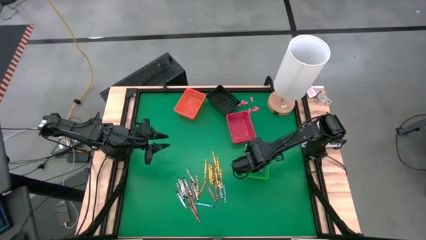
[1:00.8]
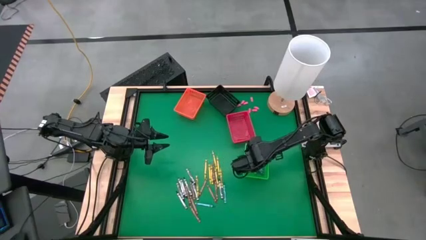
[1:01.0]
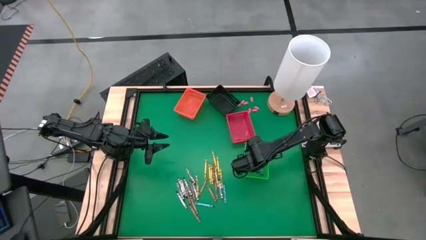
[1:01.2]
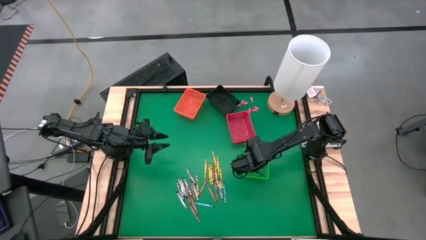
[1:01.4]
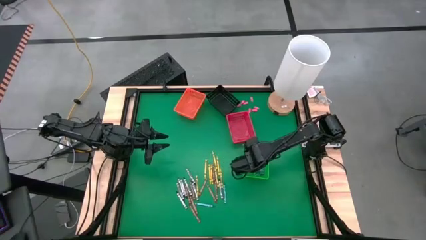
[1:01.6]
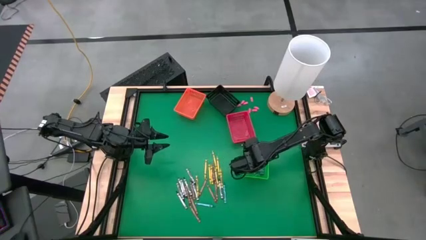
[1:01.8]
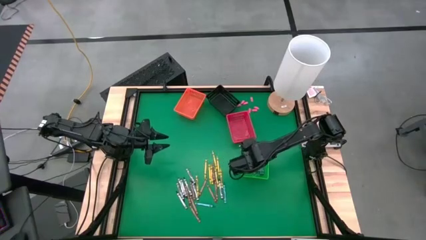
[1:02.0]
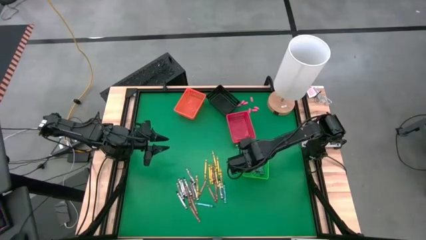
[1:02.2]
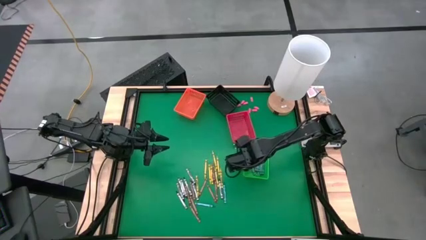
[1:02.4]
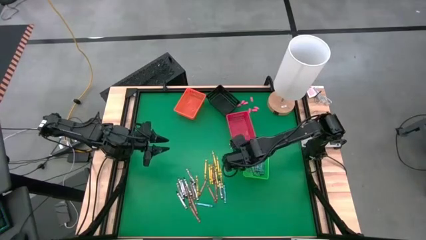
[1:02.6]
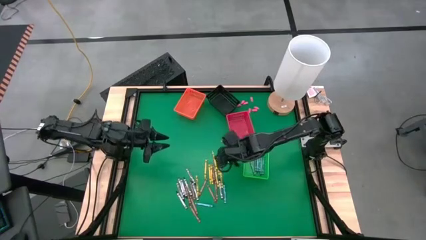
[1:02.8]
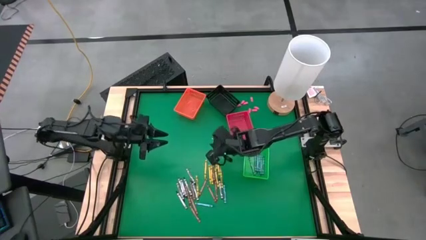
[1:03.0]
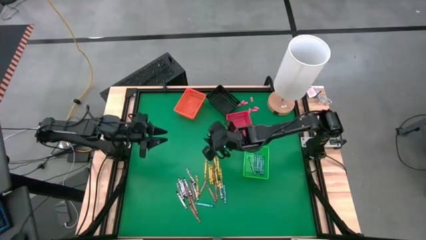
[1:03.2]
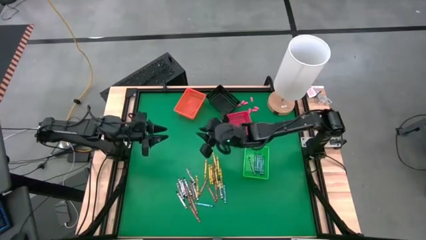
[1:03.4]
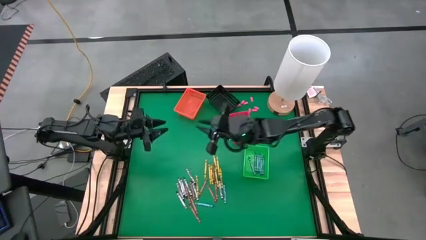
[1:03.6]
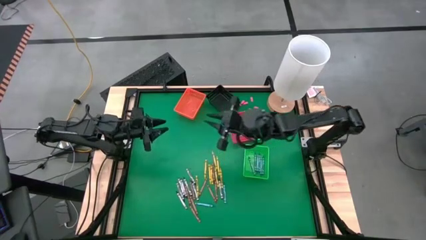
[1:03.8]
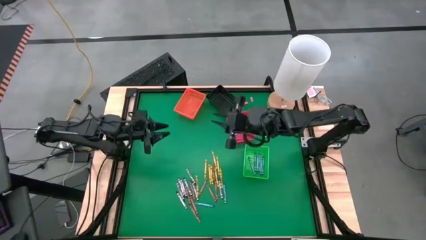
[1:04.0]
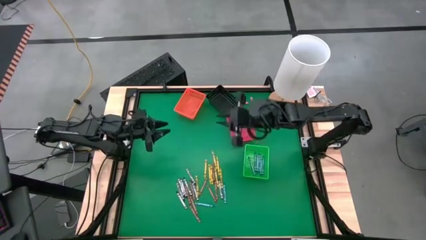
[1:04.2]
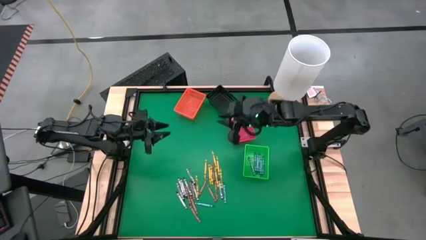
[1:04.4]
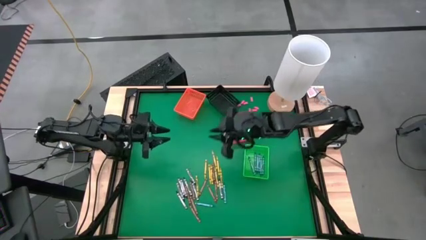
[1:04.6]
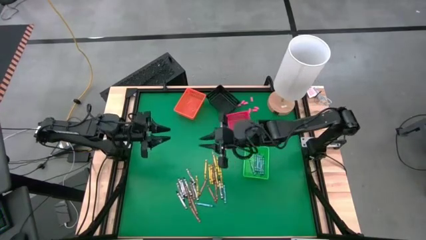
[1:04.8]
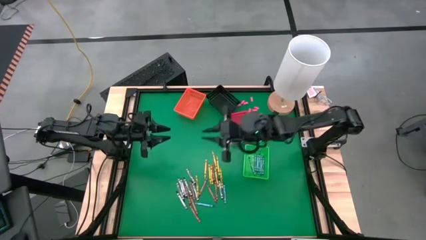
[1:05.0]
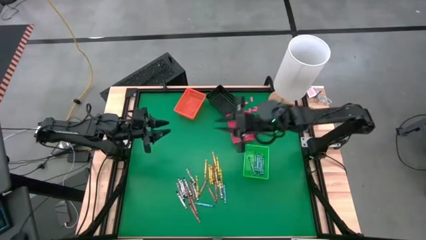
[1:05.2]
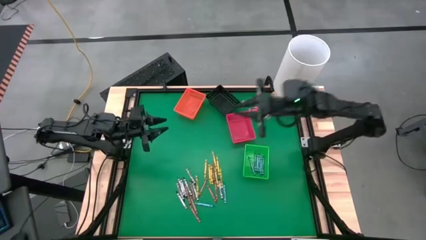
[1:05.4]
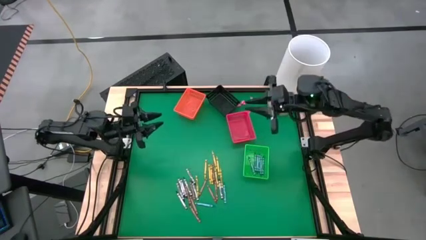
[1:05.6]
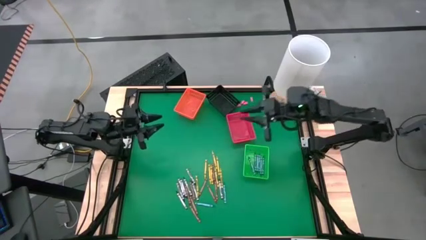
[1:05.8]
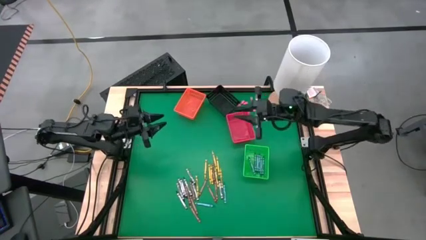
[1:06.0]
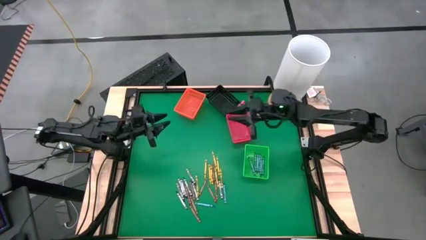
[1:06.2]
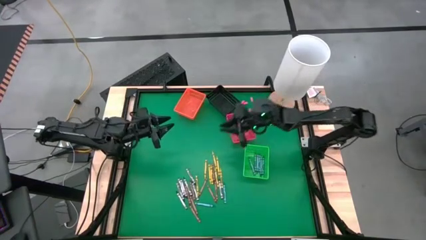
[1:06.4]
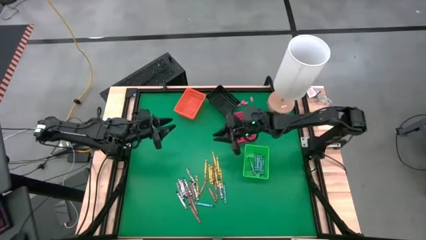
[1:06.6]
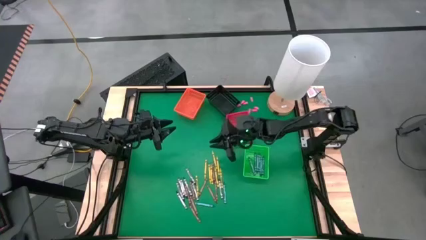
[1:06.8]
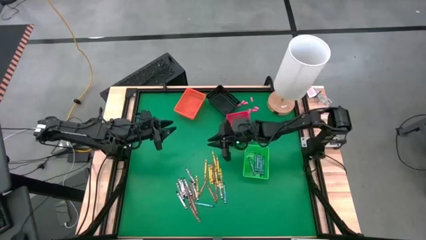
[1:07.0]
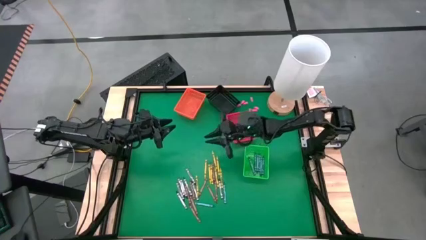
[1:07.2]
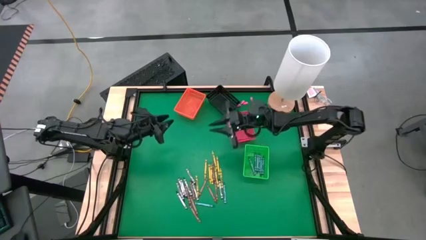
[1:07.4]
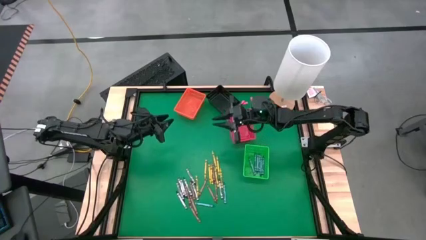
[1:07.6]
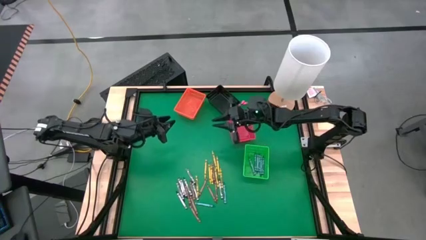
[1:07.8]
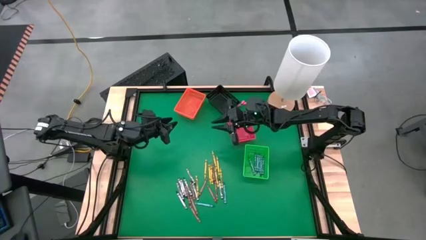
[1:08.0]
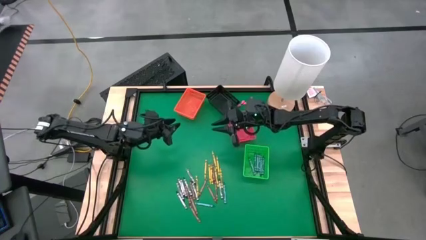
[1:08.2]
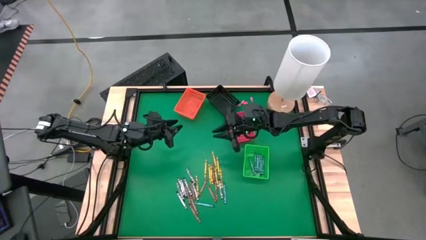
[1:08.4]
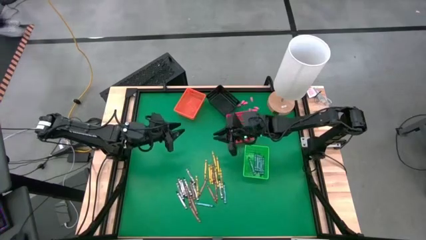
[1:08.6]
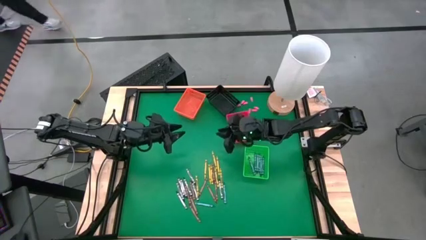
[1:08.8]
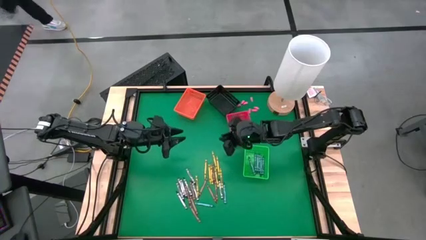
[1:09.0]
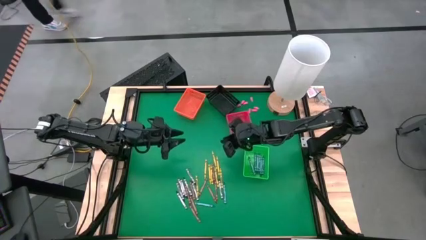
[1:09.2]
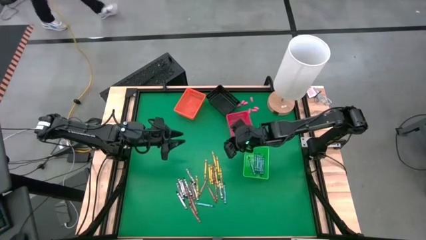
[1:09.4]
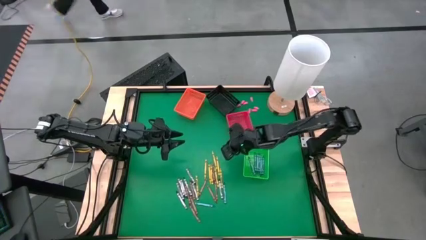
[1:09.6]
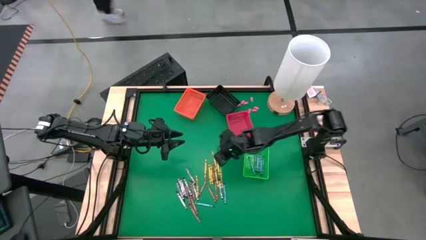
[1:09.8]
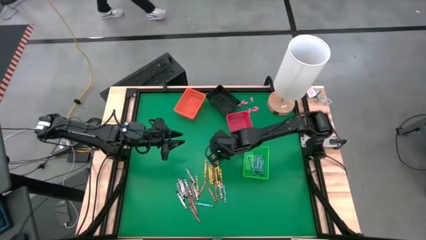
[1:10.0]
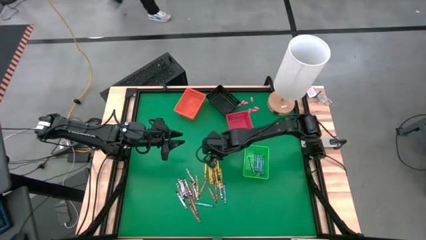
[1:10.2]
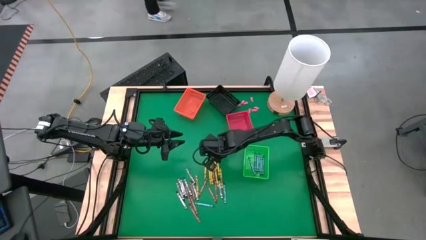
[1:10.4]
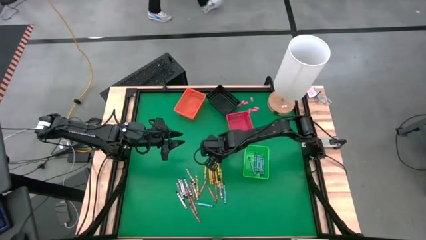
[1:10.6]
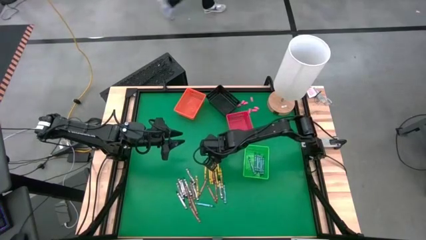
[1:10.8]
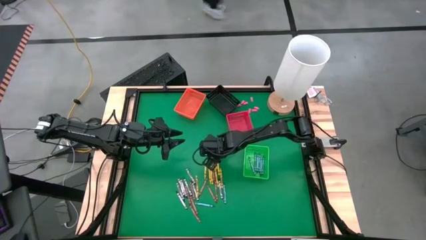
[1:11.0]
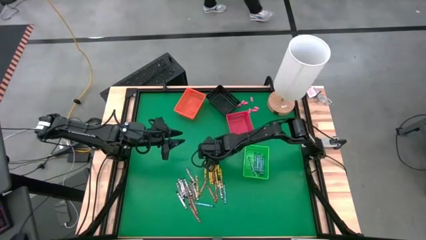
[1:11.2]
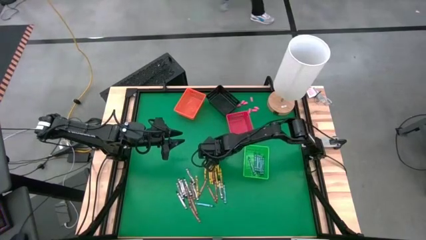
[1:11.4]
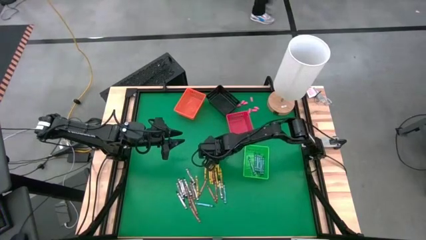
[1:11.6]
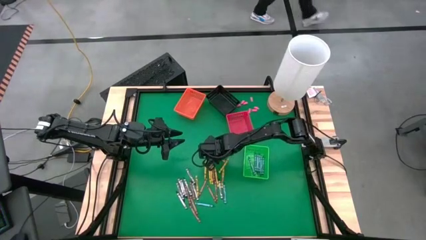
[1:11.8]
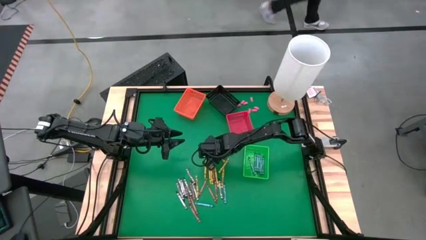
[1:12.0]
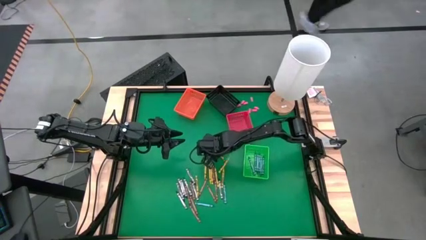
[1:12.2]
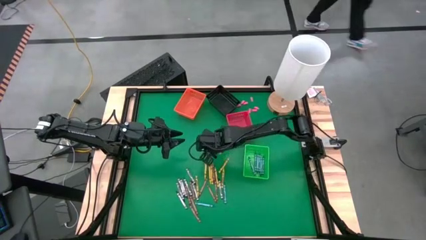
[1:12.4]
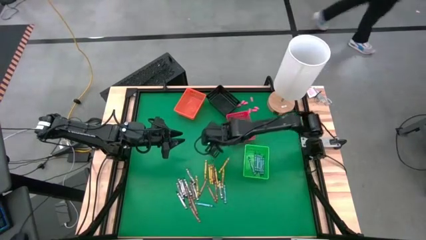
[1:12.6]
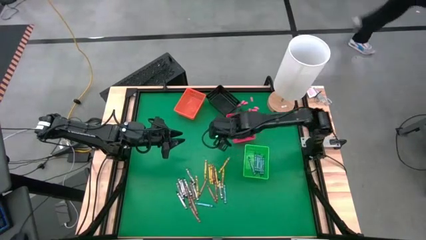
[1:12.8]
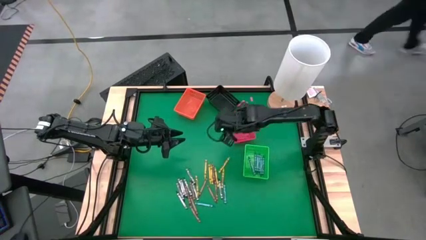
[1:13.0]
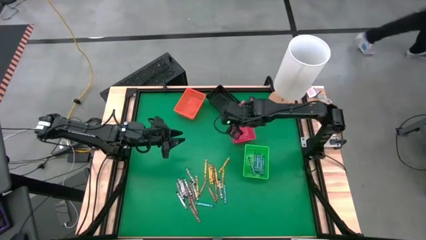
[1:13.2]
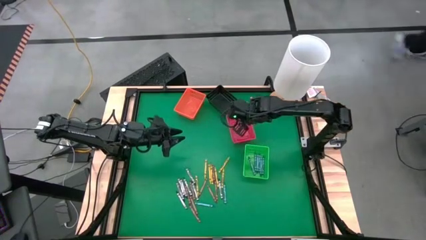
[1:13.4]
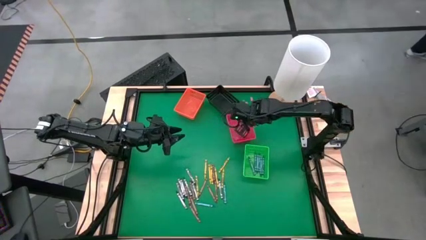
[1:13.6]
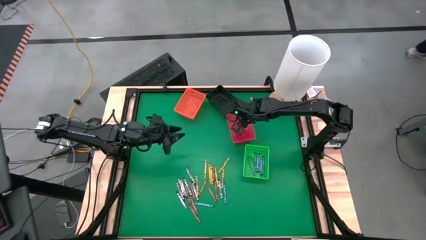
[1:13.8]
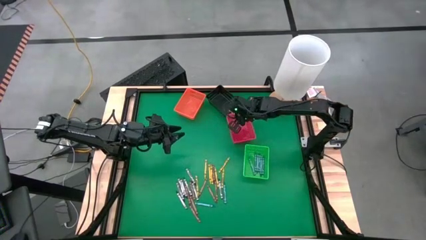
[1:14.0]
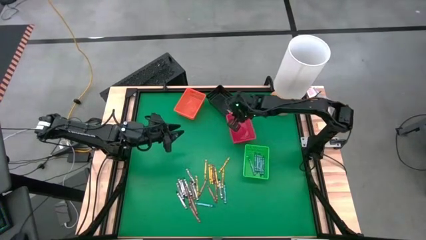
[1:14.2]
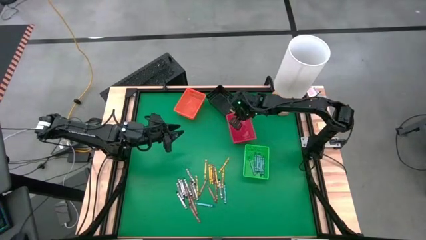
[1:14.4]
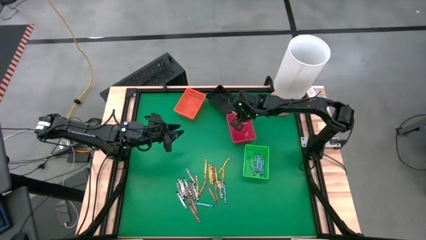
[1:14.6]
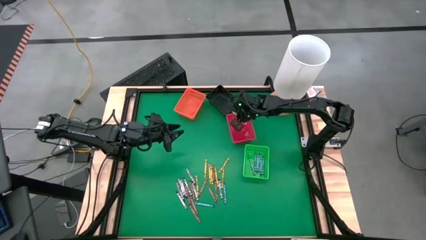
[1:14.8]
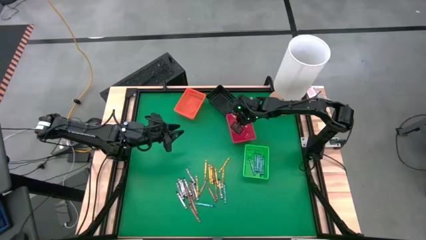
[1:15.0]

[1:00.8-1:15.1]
Task: Sort crayons
Put the yellow crayon into the red bin
